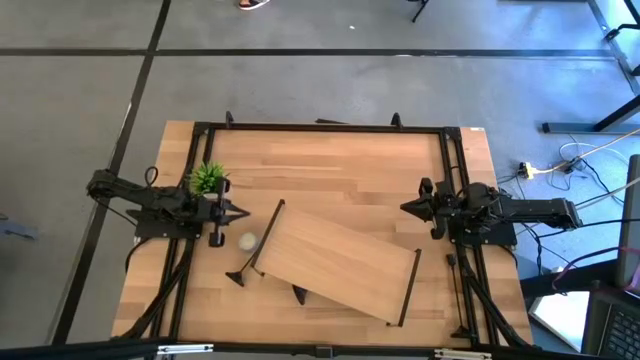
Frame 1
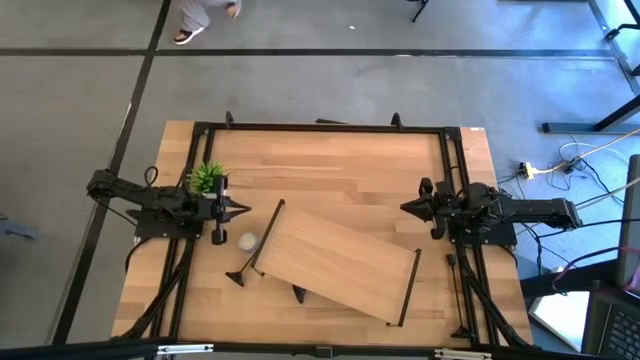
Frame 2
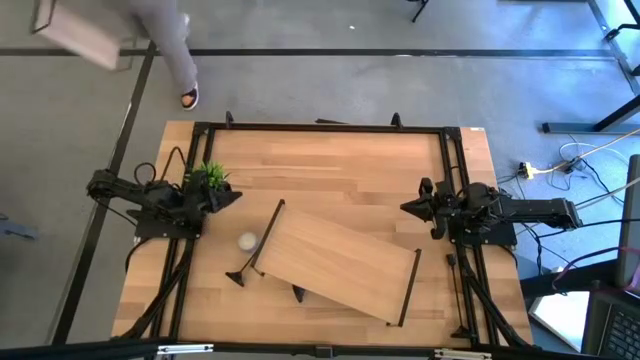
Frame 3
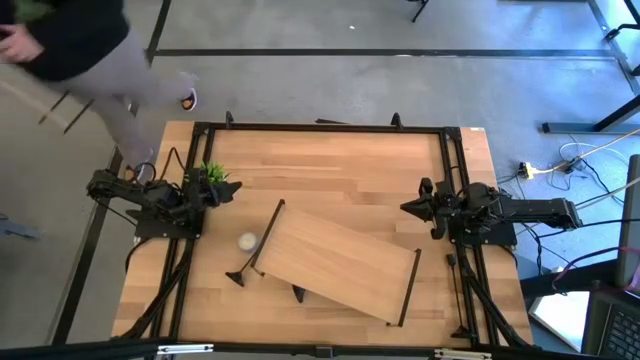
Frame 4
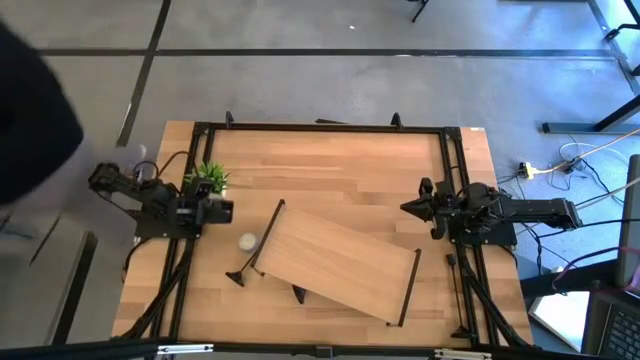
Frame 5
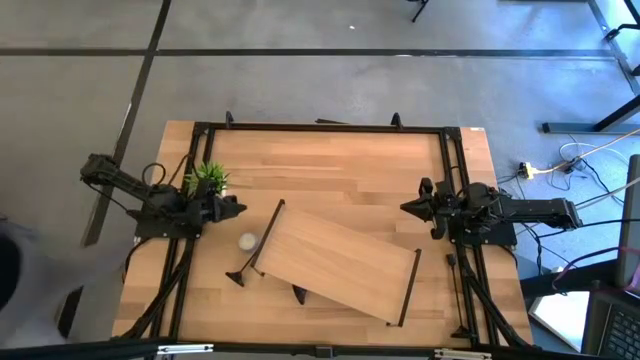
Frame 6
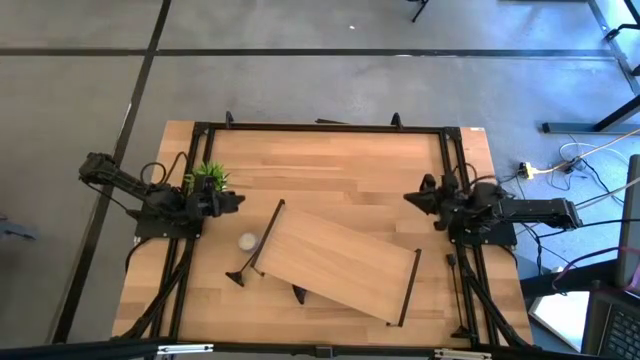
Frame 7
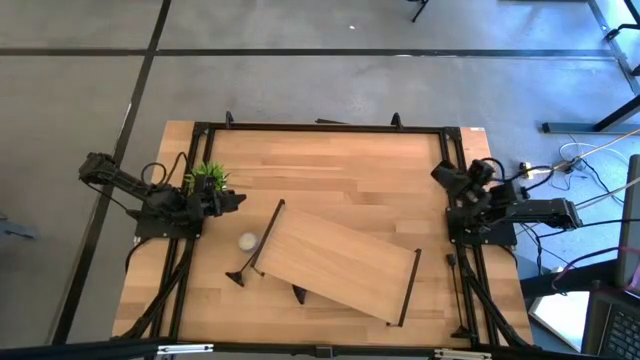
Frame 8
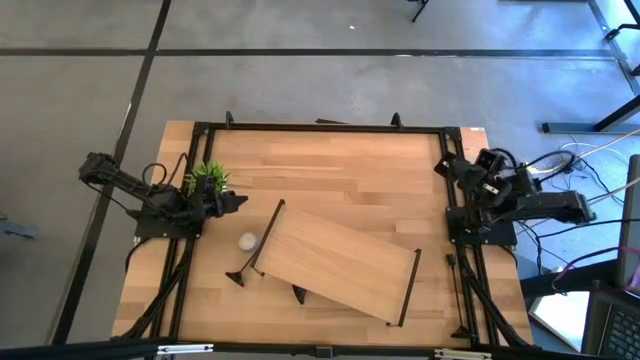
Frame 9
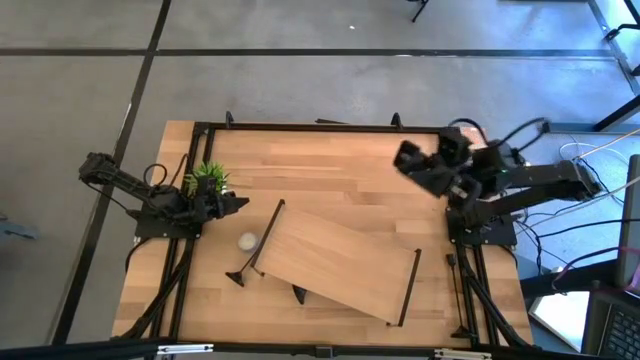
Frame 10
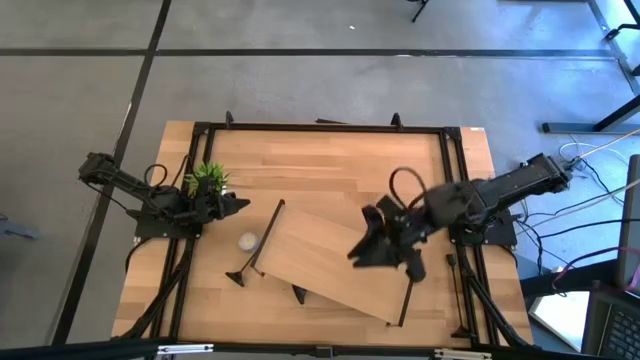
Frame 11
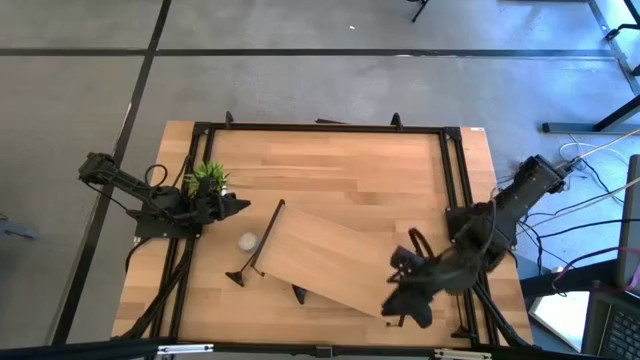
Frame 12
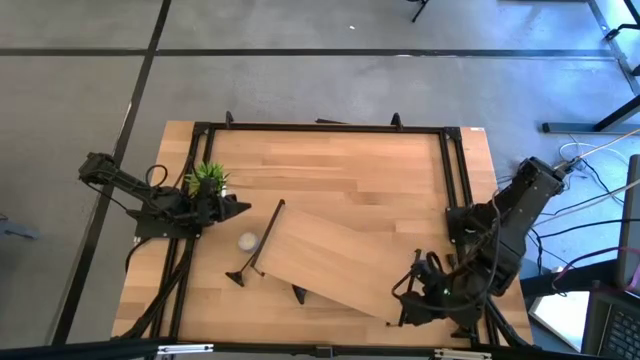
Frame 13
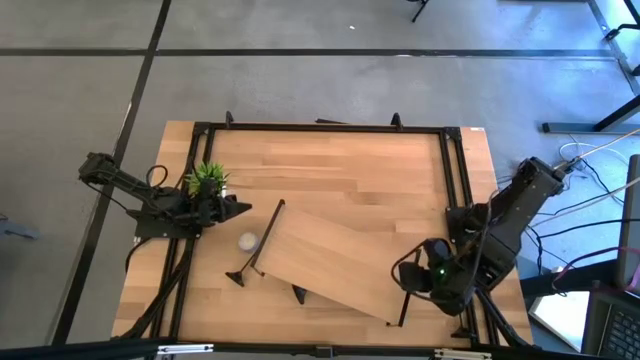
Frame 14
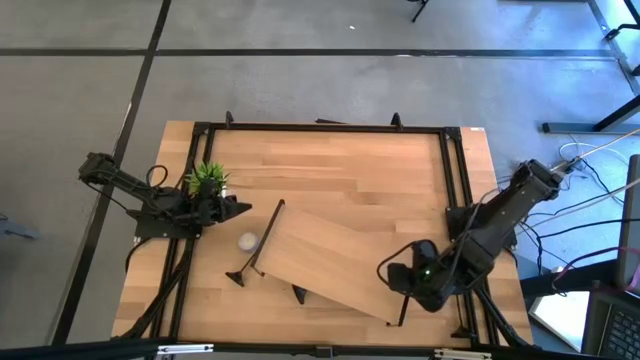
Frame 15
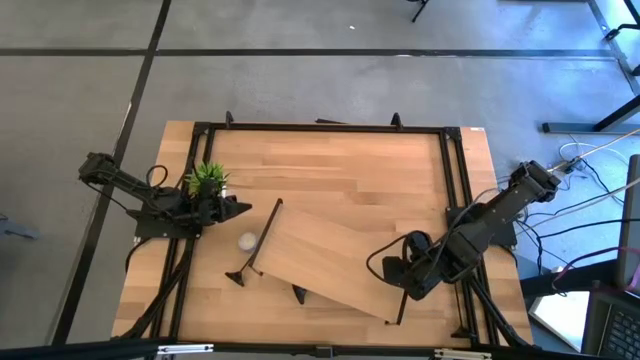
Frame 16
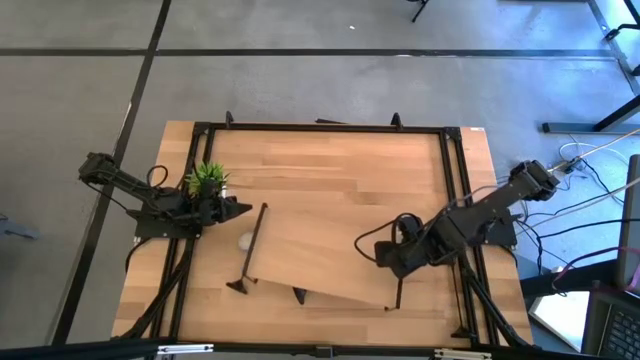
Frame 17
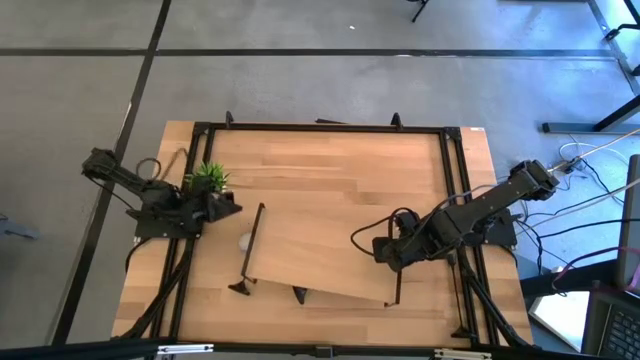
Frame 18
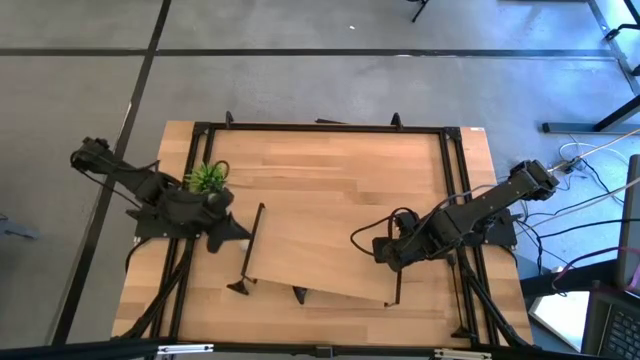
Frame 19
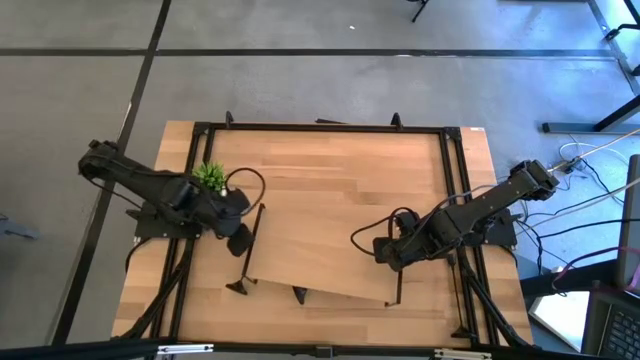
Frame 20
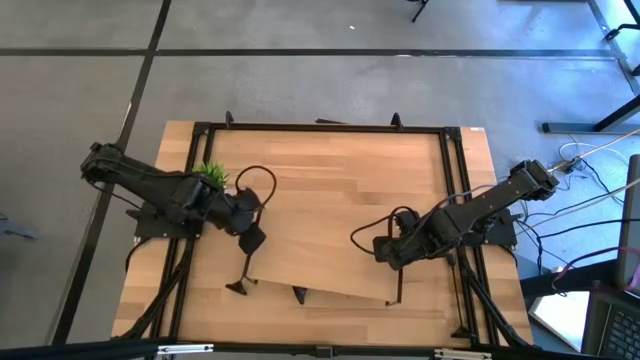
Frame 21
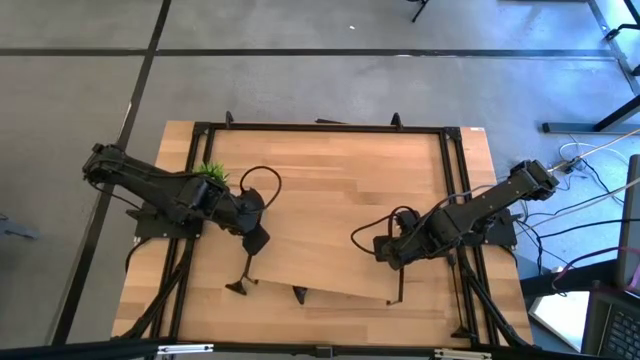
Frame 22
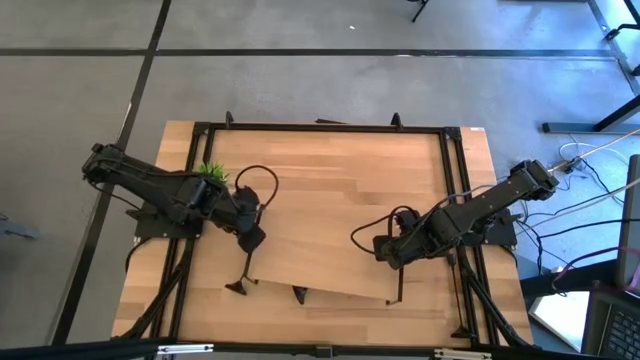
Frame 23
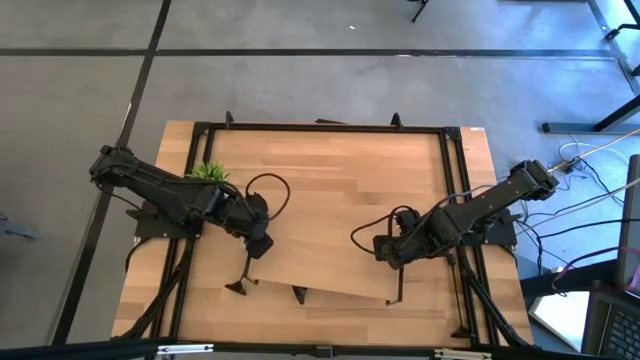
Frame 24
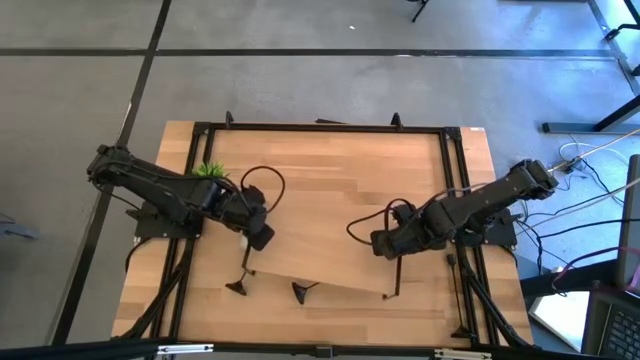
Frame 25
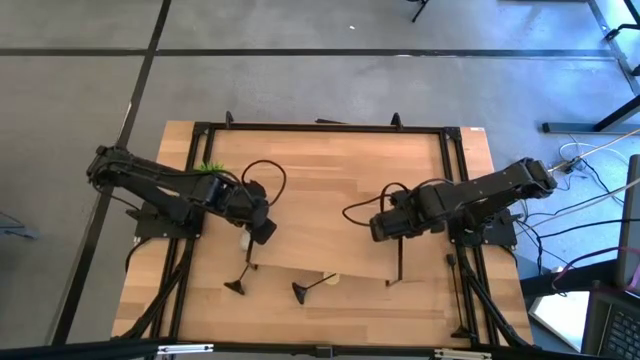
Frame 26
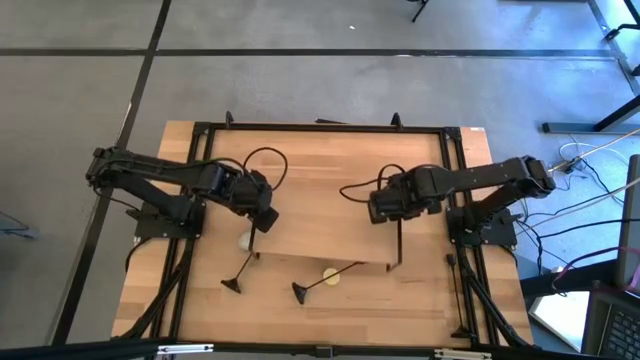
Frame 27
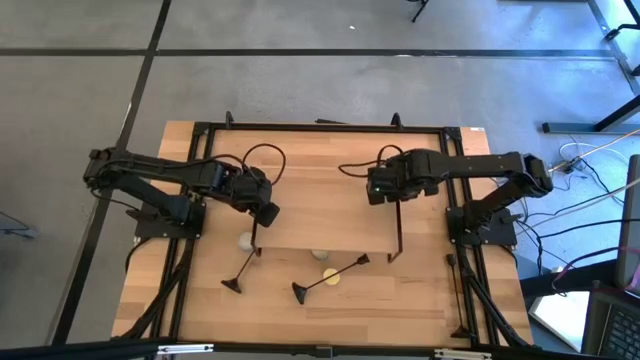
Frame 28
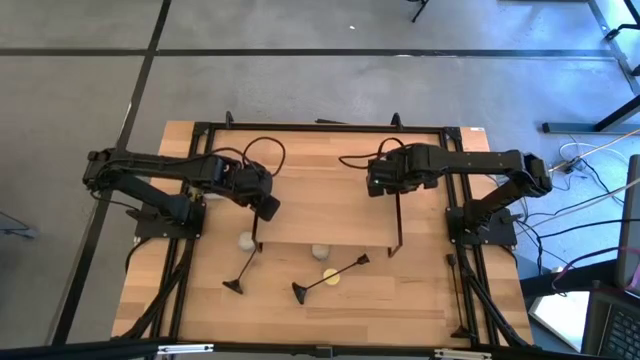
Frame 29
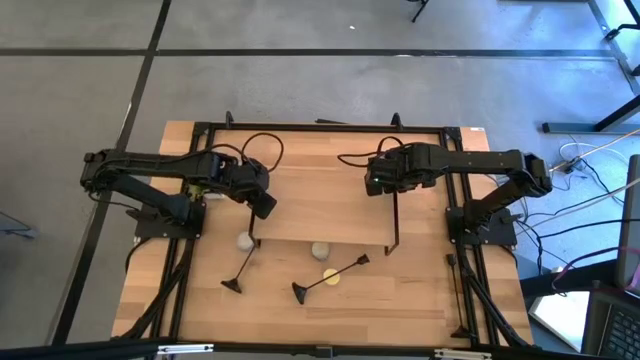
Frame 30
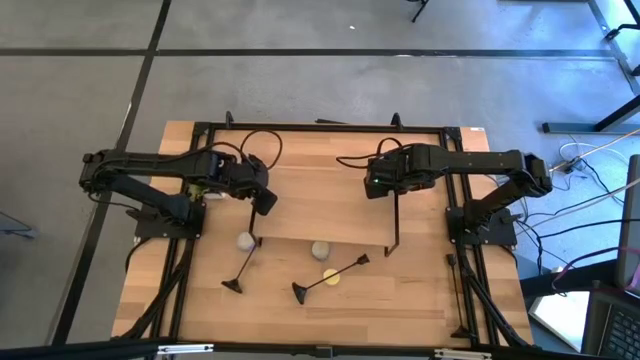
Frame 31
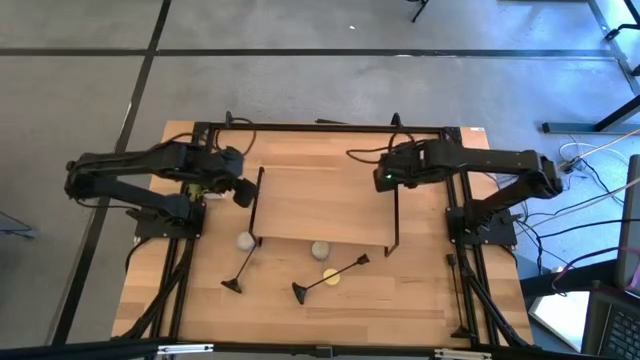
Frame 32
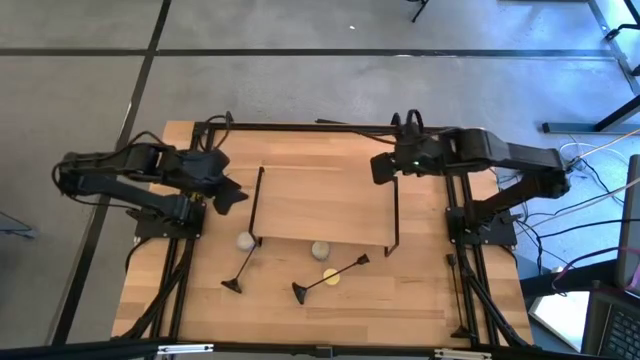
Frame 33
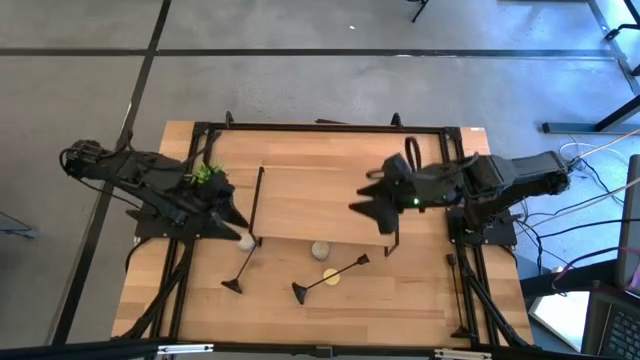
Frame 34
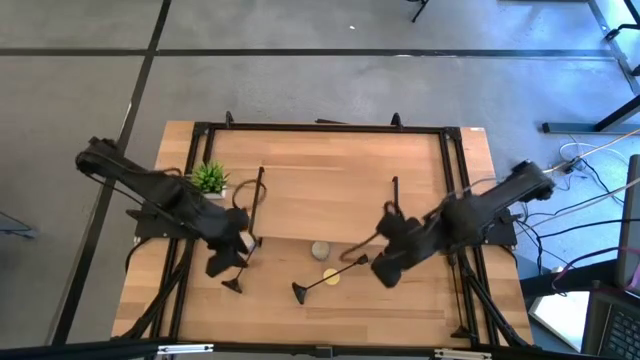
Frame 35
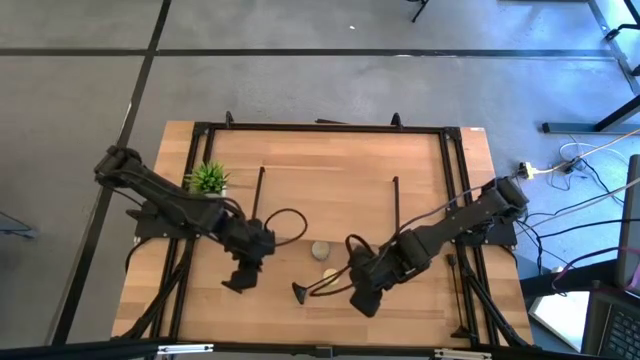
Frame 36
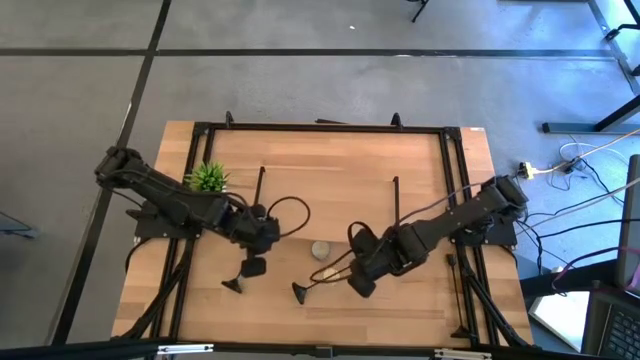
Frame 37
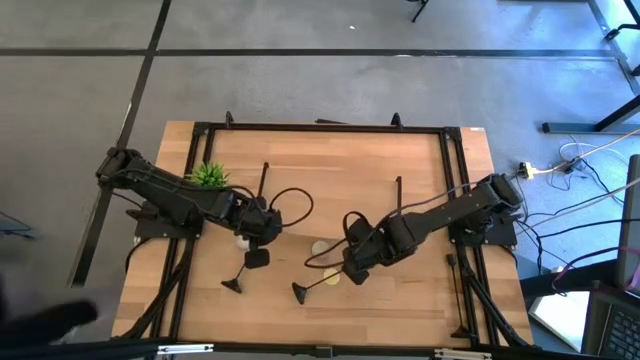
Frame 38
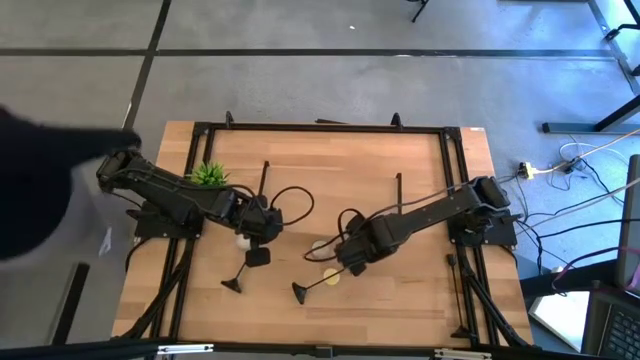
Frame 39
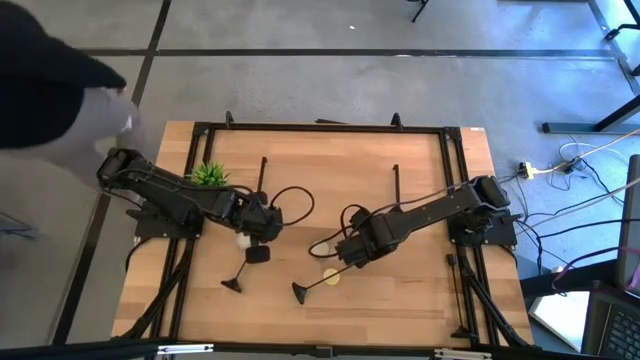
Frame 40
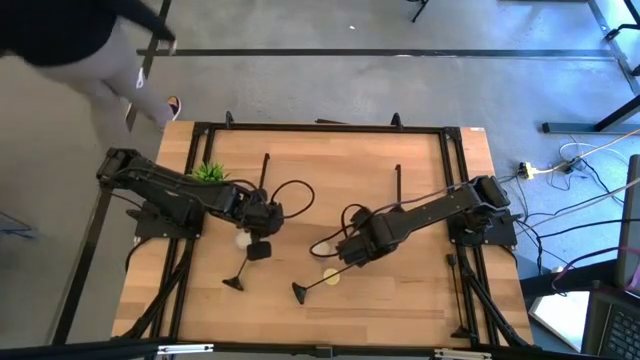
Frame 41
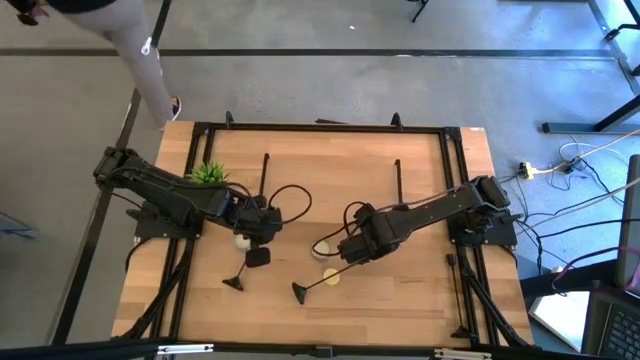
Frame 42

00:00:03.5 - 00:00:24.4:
Task: Pick & Place candle stick holders
Move the shelf from the bottom to the center of the table
